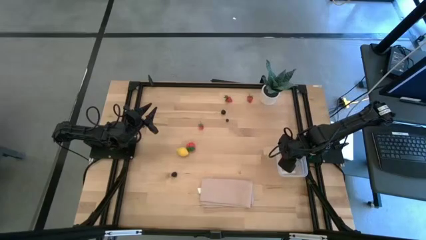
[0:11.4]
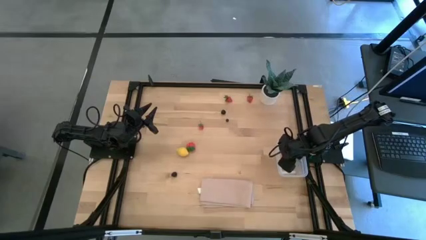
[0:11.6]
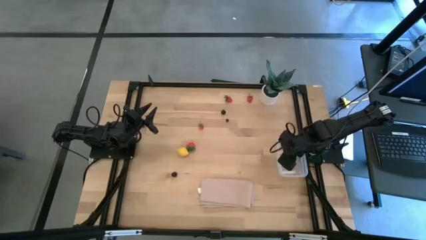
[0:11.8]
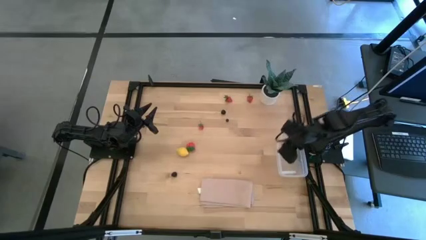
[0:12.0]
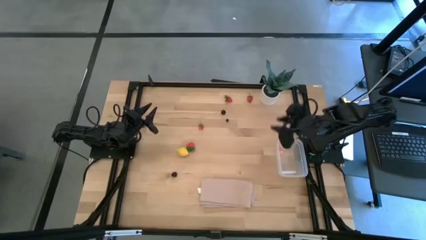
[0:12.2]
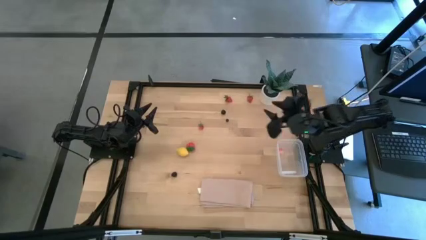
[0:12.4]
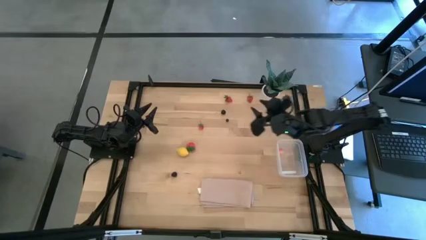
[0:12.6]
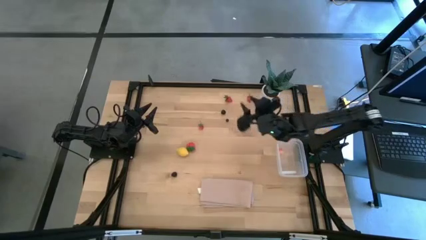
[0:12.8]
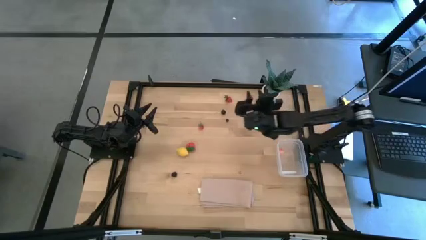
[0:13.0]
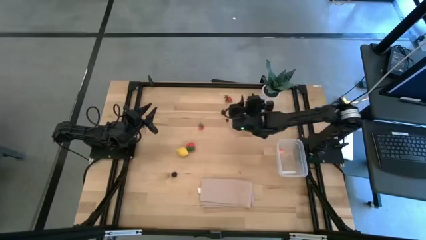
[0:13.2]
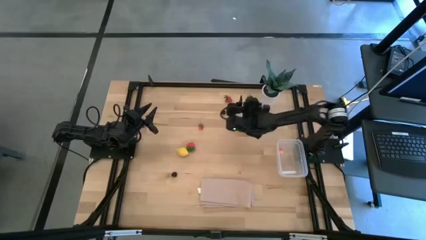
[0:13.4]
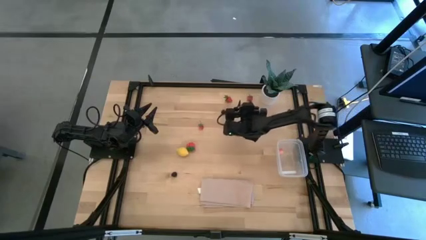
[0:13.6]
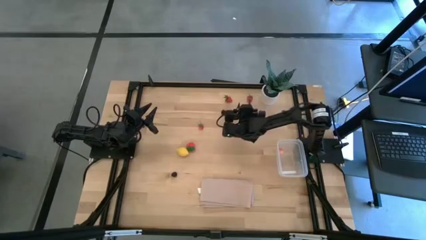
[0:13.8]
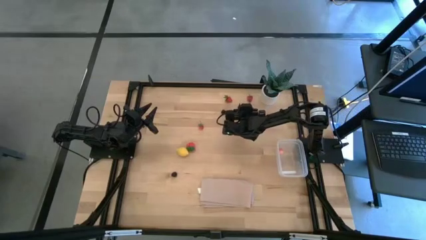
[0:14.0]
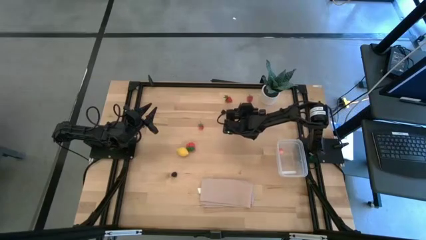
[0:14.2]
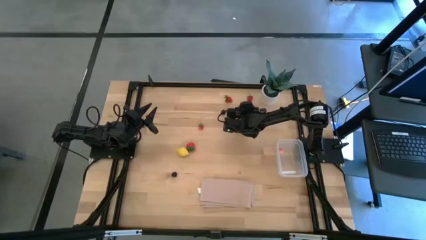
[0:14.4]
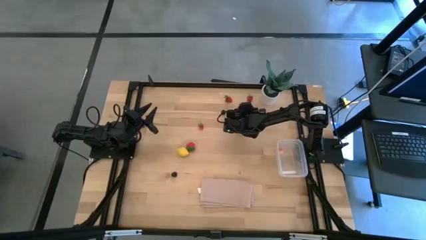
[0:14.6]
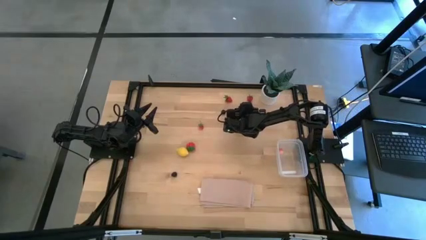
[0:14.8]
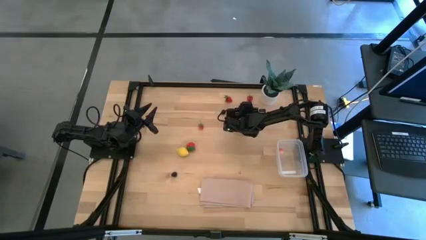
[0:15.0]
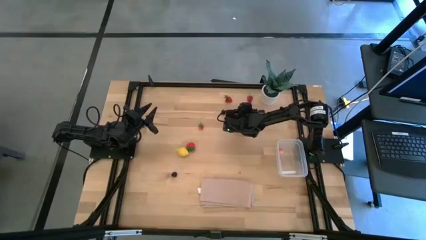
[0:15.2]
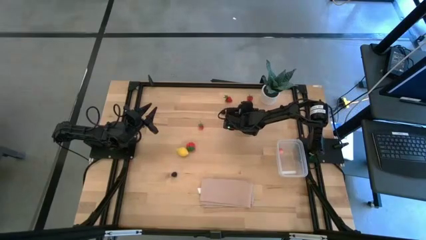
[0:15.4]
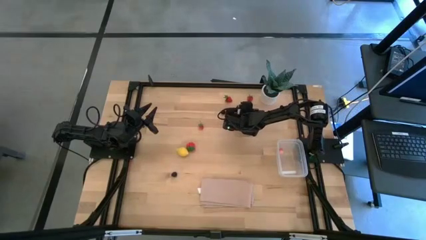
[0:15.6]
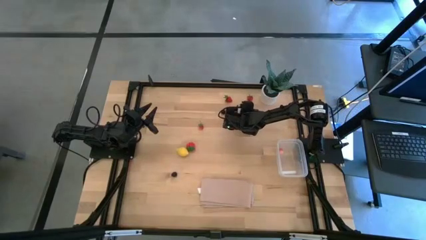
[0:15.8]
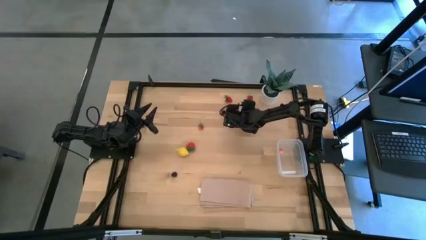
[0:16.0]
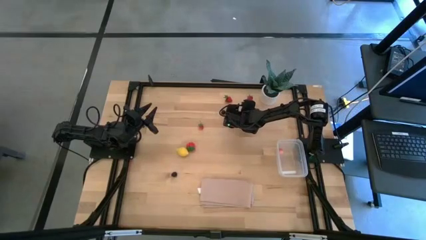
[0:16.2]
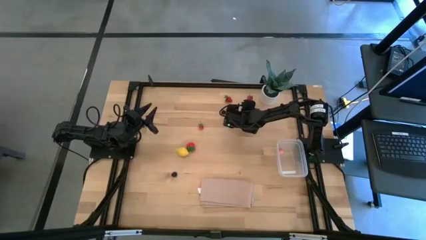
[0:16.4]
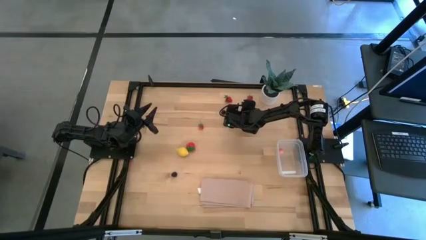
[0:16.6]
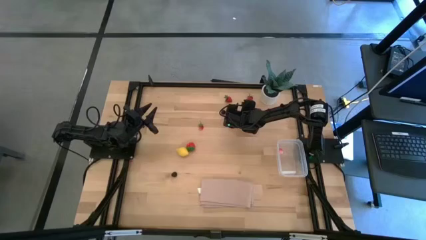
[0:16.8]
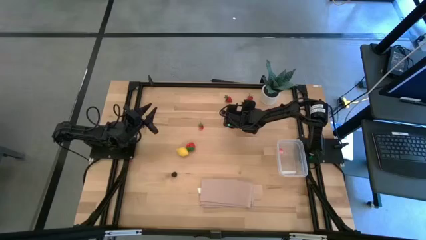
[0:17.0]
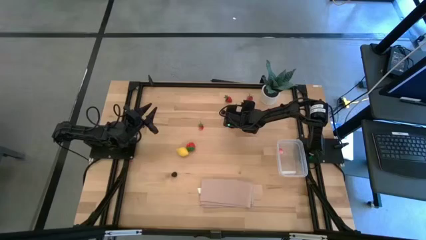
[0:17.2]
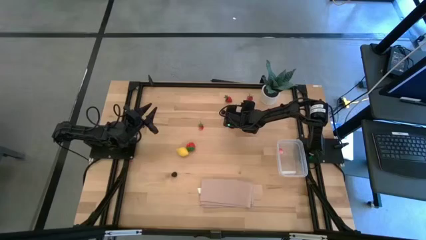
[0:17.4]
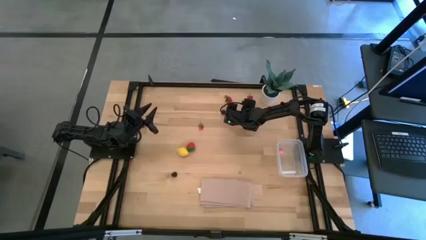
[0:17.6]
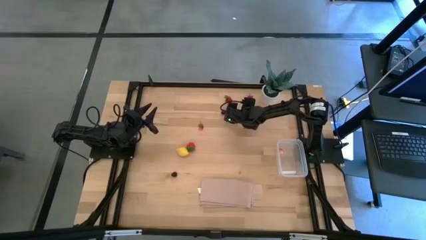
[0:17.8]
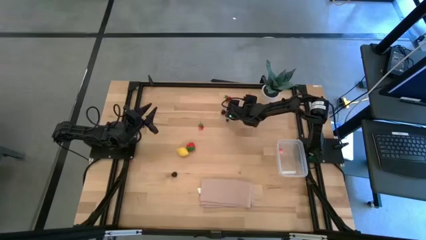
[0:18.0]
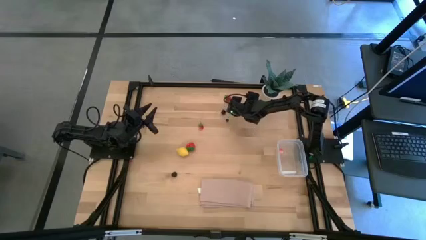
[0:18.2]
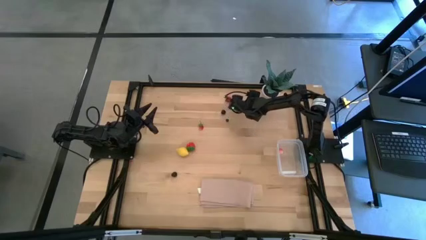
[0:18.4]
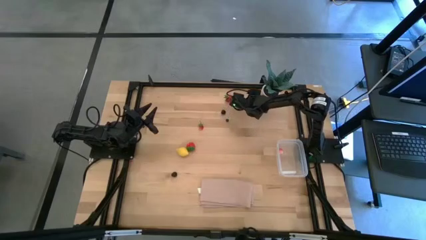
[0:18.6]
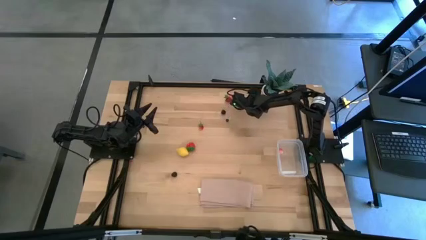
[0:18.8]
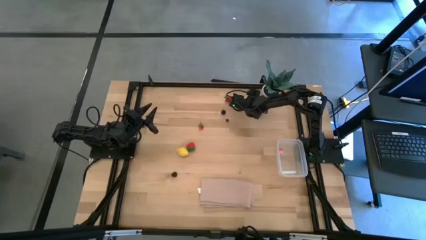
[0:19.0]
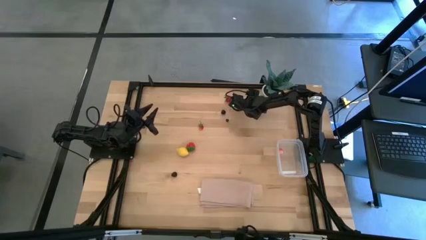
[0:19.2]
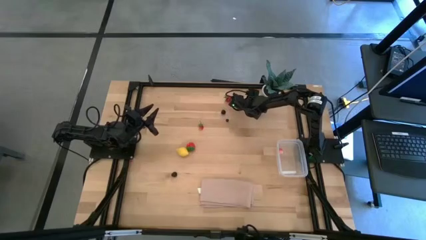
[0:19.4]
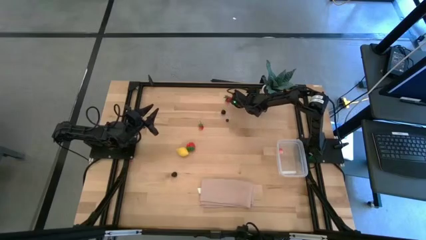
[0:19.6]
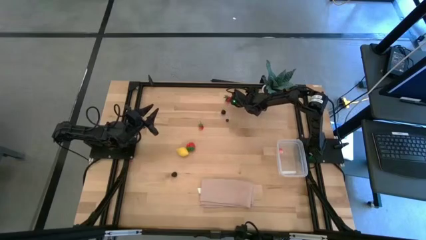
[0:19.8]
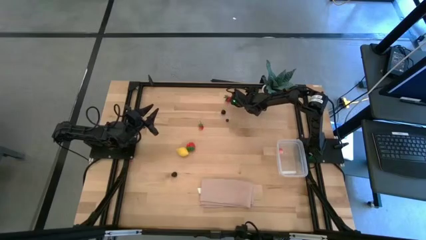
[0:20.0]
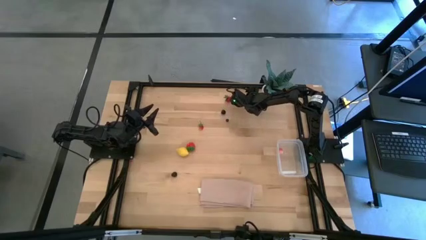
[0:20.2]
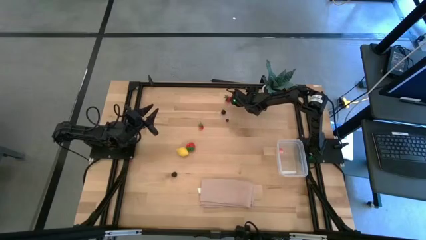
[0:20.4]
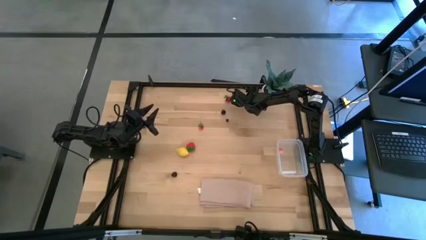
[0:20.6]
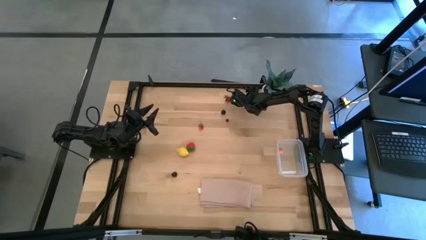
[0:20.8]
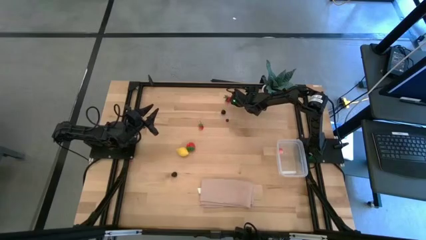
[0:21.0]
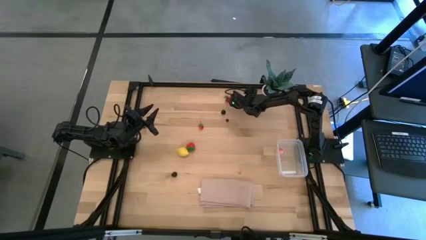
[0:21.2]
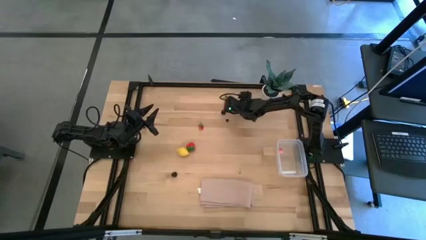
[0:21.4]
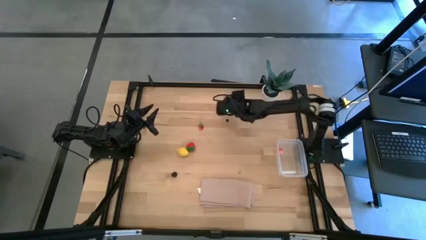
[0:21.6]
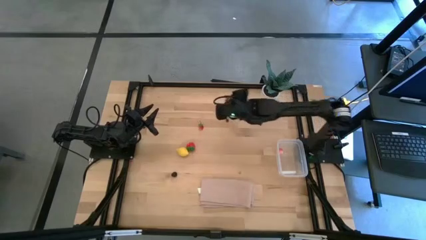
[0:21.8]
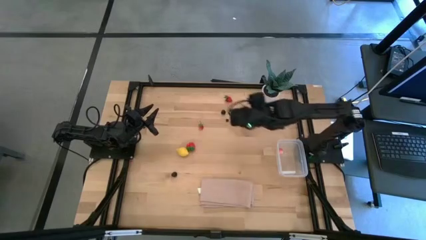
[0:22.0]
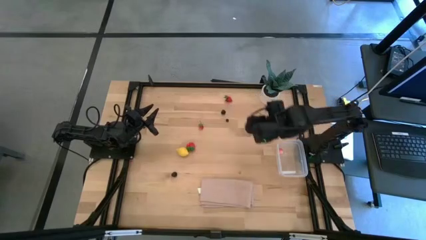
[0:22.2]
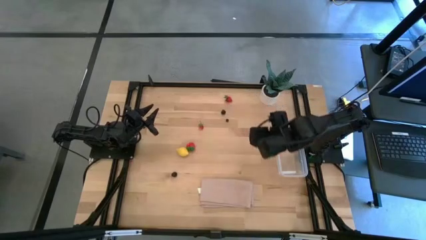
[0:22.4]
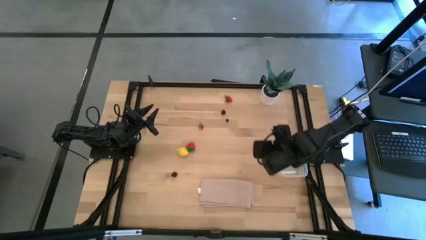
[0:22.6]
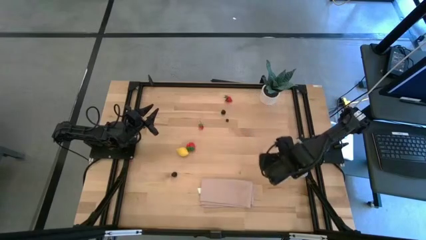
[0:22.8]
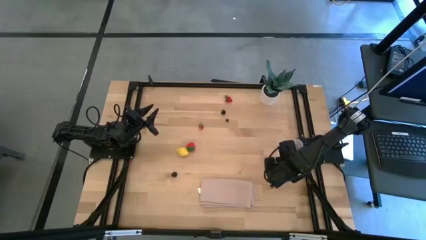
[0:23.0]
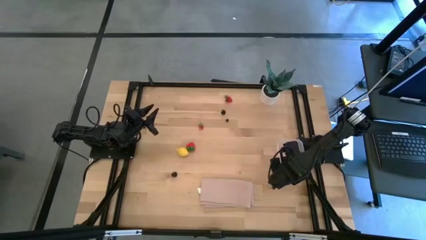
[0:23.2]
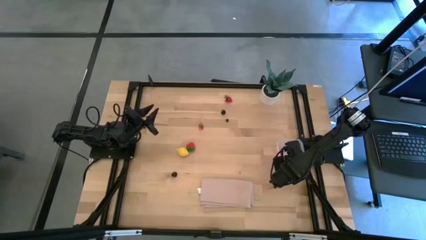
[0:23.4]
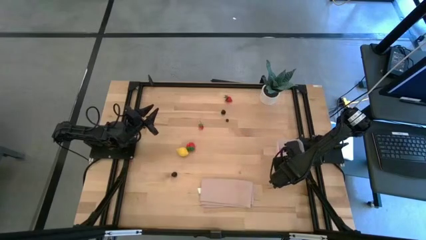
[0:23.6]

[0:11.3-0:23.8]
Task: Pick and placing Produce into tupperware
Put the top right red strawberry into the transparent bin
